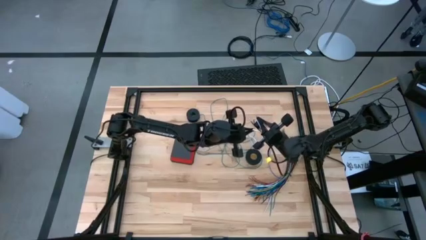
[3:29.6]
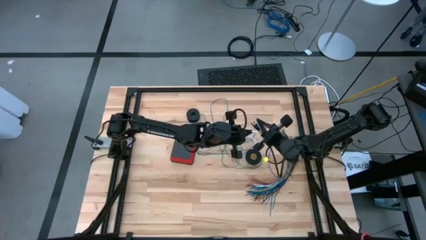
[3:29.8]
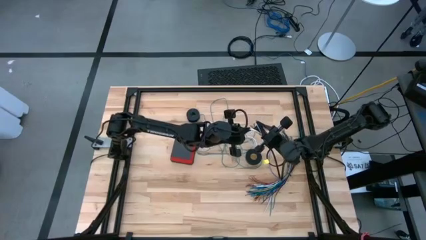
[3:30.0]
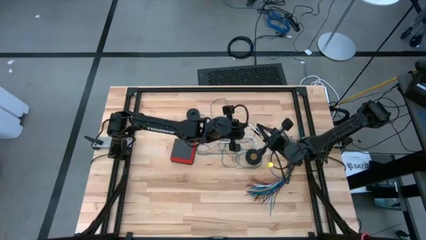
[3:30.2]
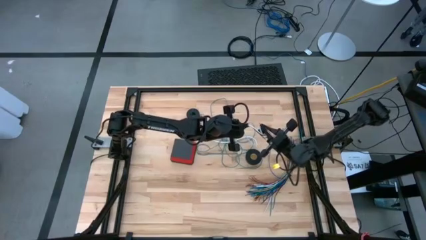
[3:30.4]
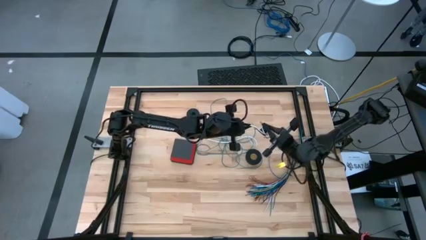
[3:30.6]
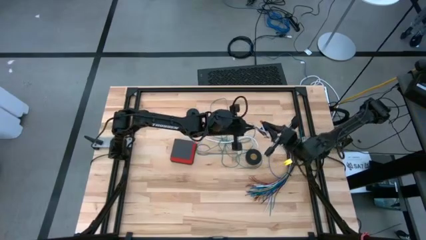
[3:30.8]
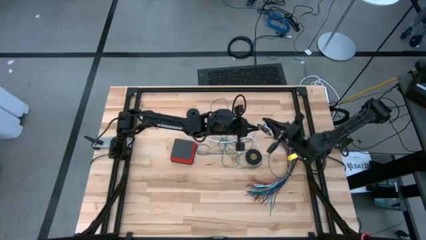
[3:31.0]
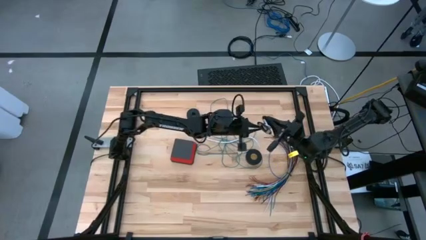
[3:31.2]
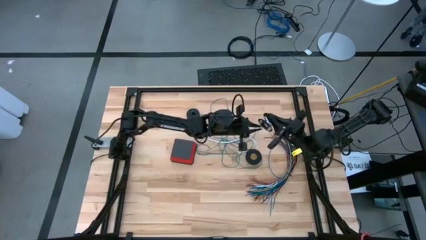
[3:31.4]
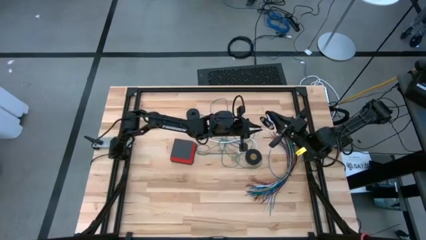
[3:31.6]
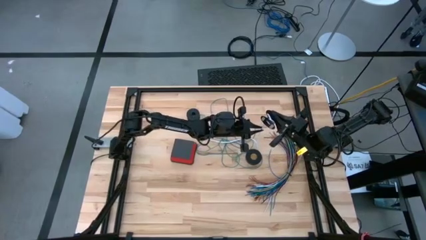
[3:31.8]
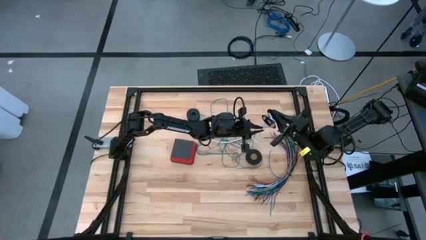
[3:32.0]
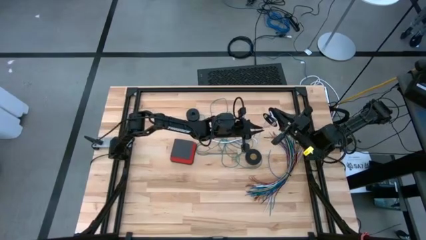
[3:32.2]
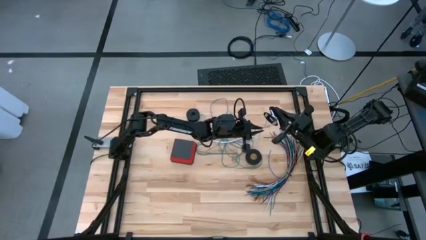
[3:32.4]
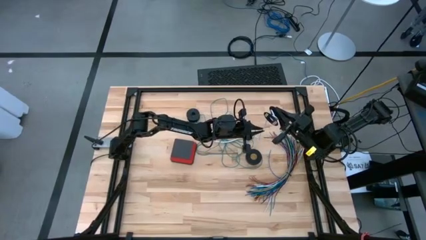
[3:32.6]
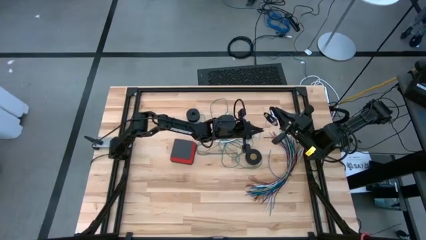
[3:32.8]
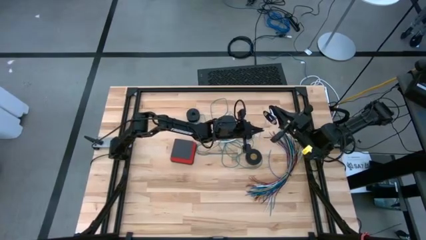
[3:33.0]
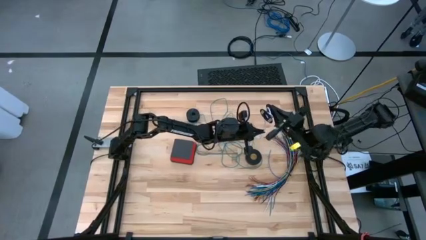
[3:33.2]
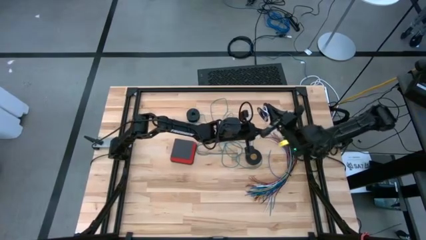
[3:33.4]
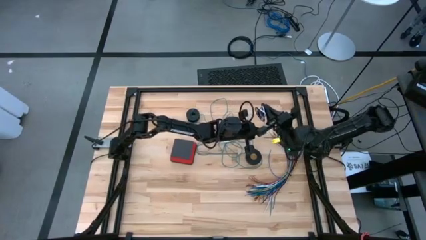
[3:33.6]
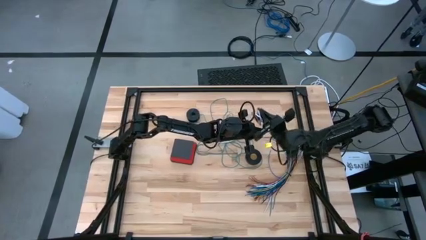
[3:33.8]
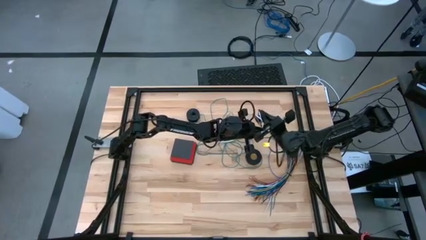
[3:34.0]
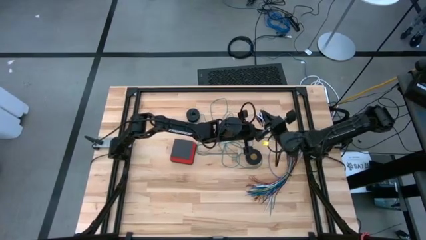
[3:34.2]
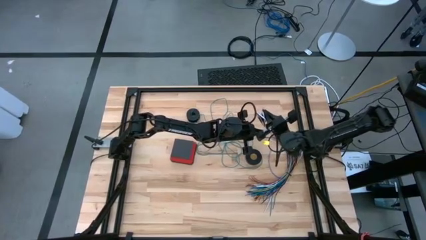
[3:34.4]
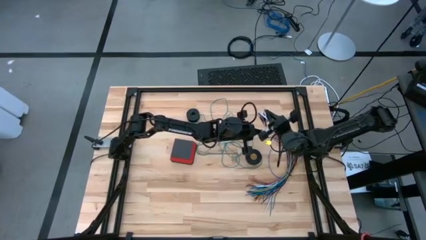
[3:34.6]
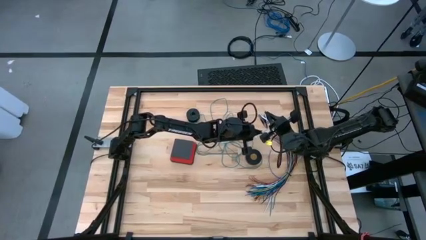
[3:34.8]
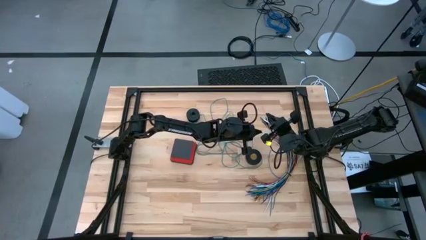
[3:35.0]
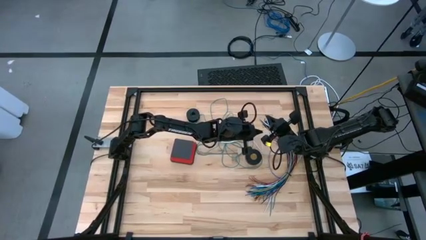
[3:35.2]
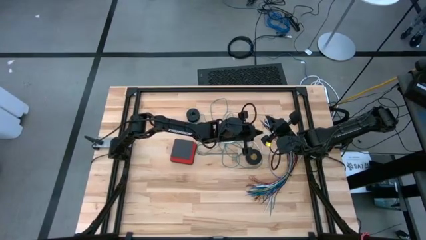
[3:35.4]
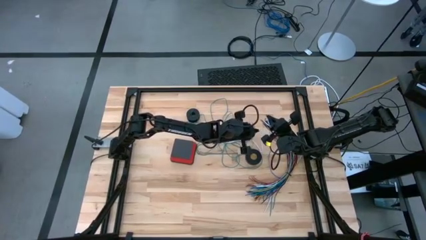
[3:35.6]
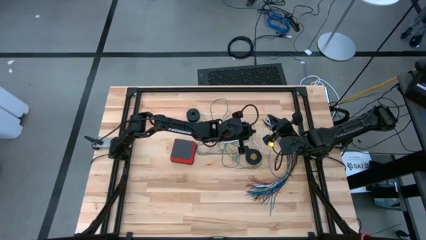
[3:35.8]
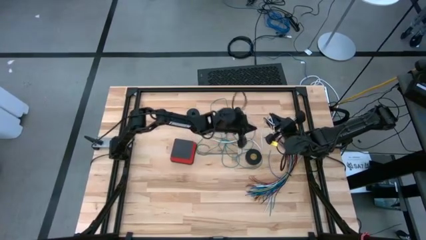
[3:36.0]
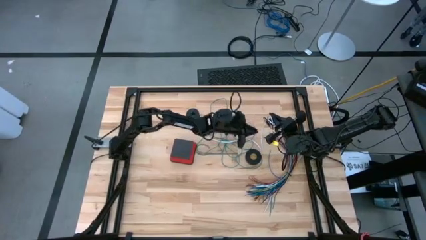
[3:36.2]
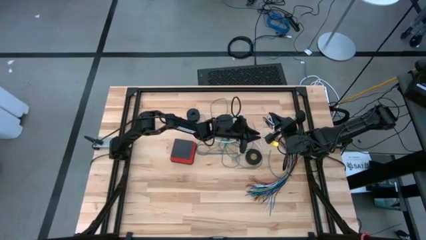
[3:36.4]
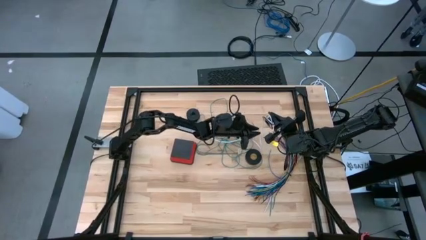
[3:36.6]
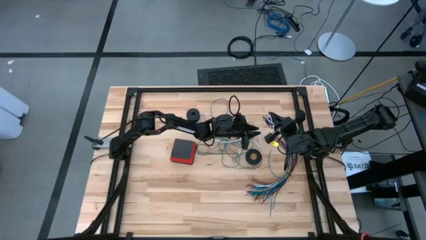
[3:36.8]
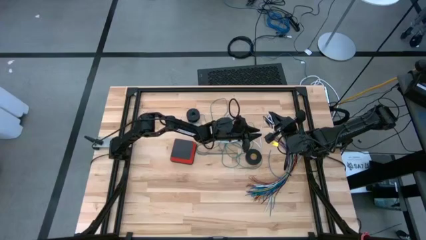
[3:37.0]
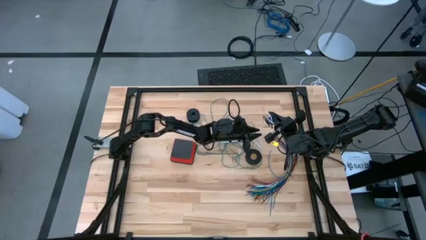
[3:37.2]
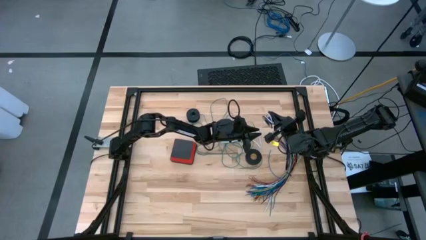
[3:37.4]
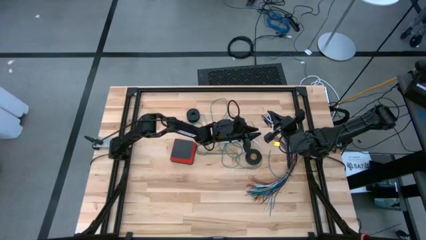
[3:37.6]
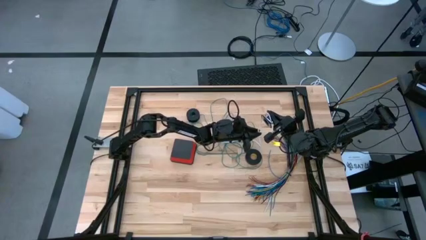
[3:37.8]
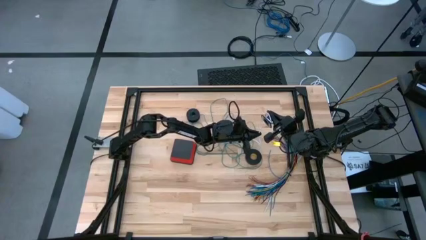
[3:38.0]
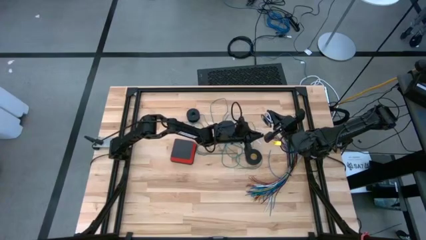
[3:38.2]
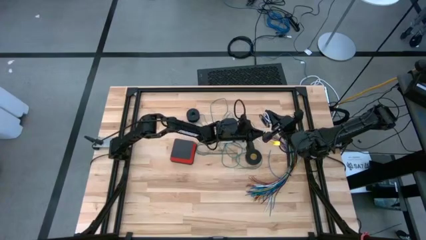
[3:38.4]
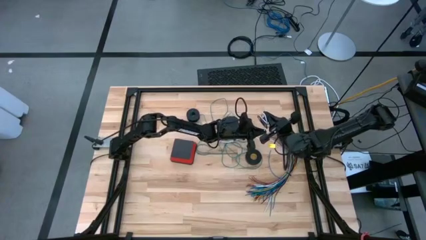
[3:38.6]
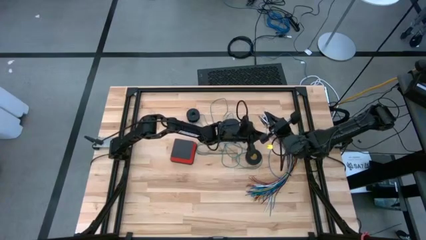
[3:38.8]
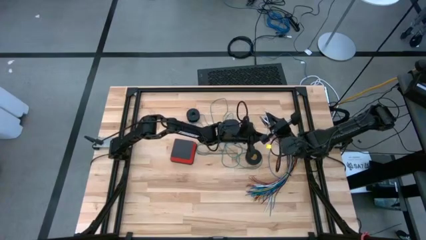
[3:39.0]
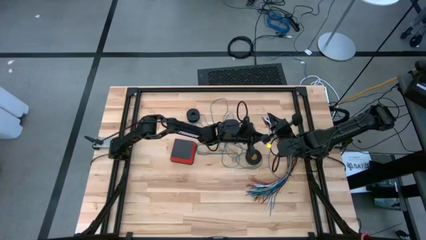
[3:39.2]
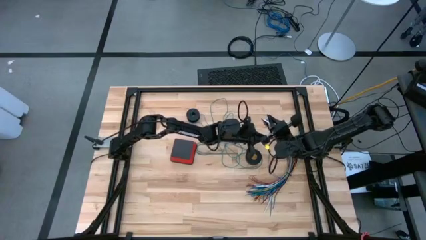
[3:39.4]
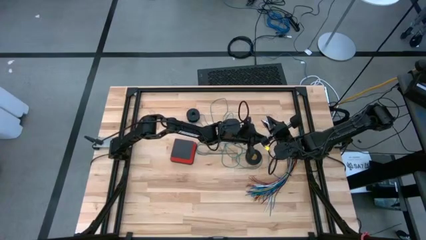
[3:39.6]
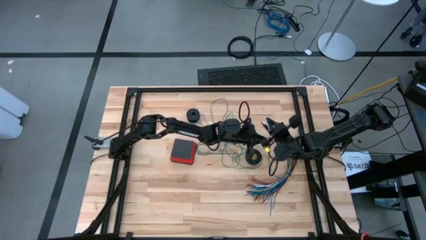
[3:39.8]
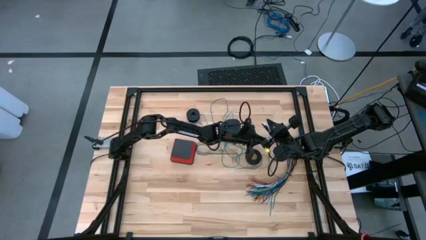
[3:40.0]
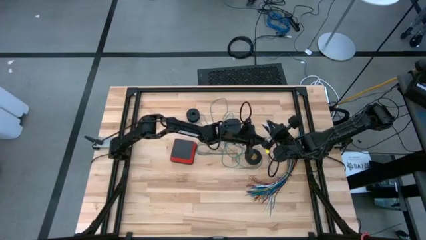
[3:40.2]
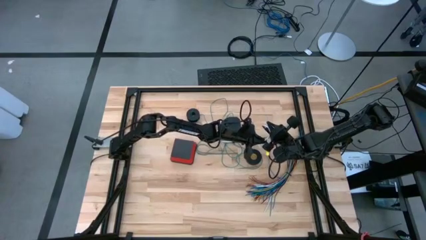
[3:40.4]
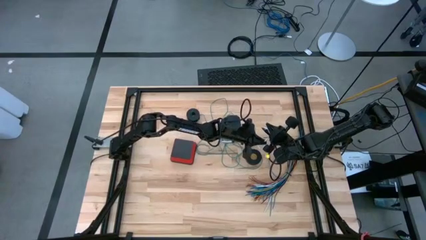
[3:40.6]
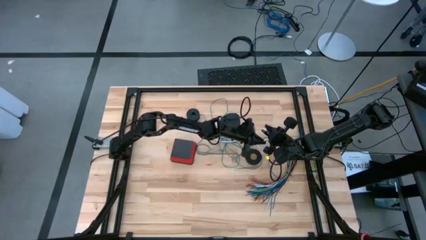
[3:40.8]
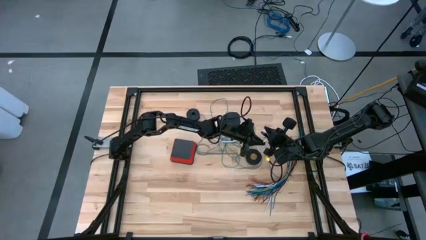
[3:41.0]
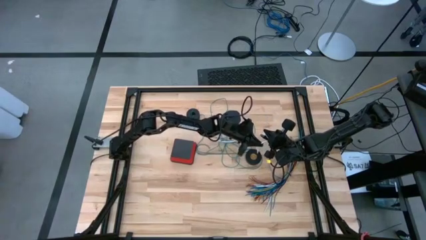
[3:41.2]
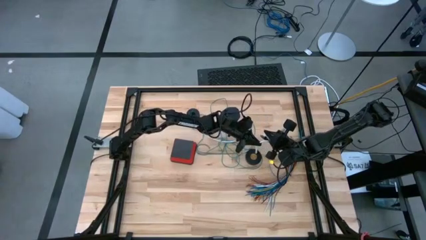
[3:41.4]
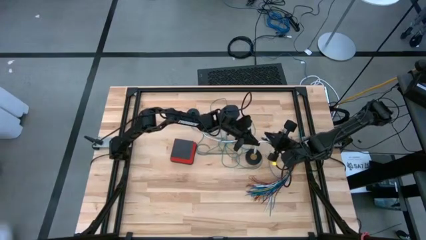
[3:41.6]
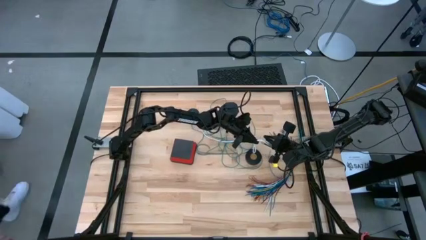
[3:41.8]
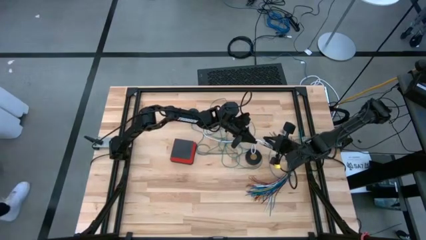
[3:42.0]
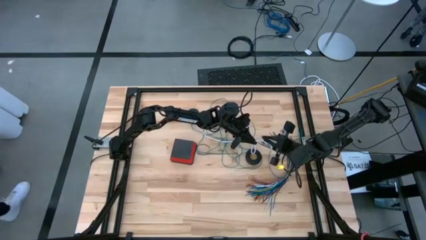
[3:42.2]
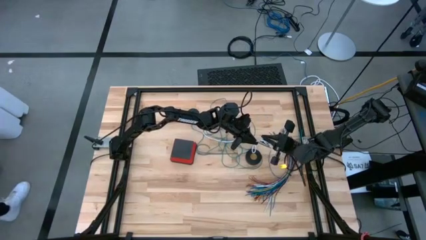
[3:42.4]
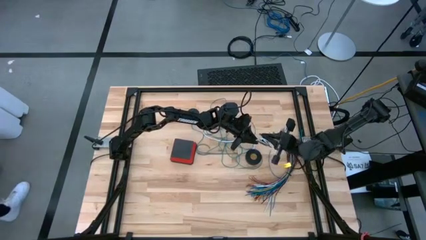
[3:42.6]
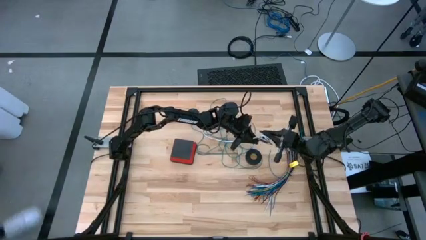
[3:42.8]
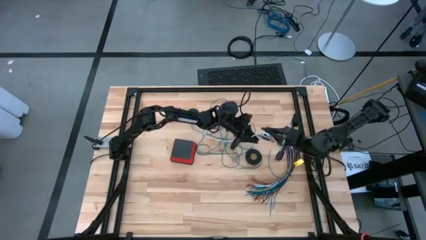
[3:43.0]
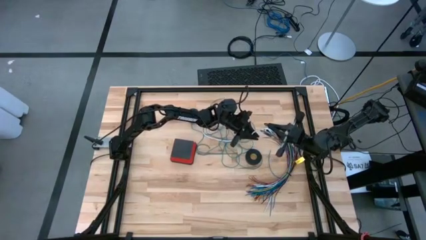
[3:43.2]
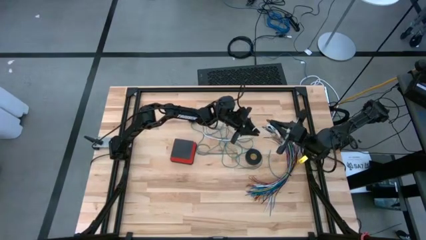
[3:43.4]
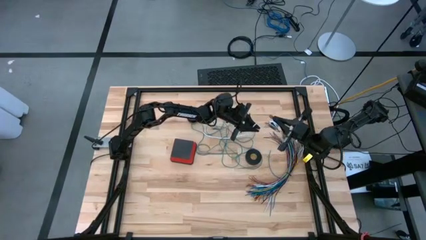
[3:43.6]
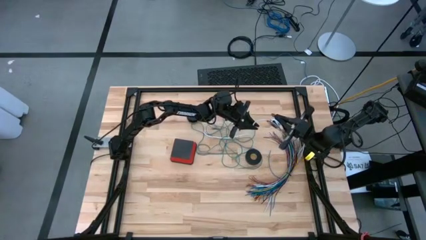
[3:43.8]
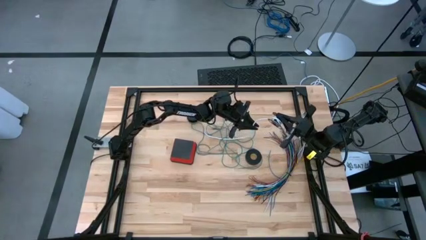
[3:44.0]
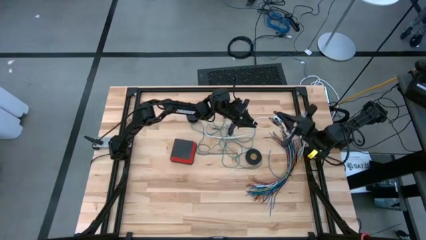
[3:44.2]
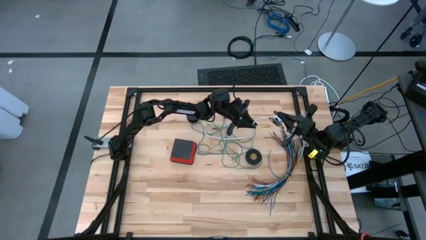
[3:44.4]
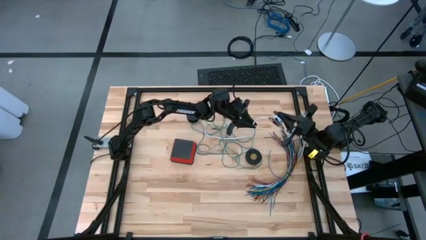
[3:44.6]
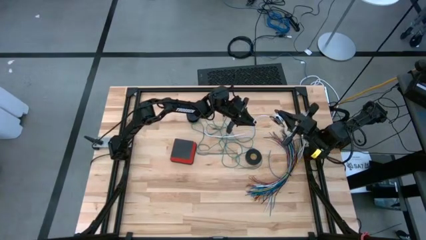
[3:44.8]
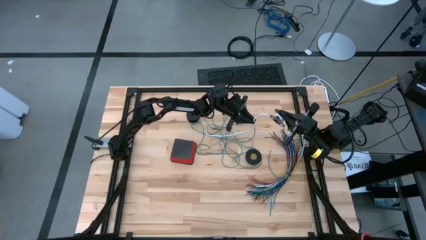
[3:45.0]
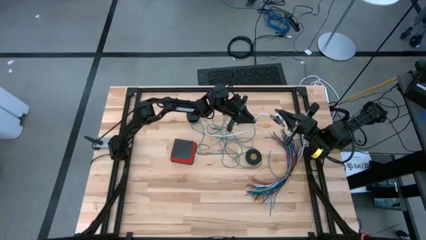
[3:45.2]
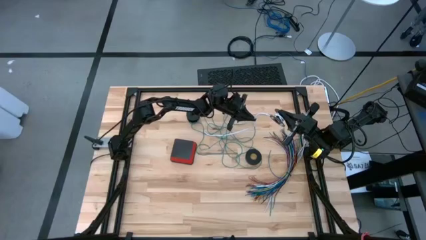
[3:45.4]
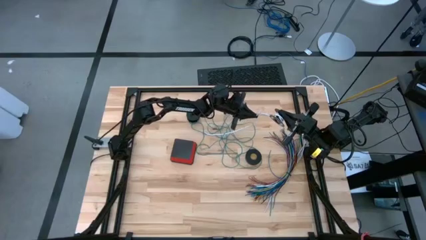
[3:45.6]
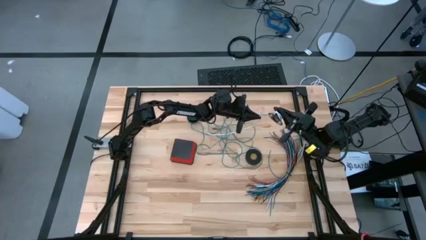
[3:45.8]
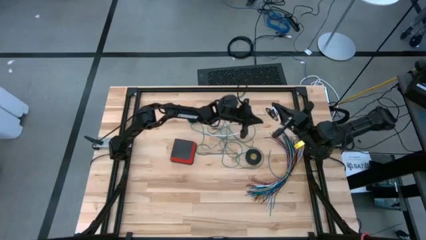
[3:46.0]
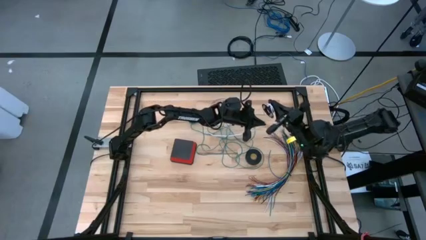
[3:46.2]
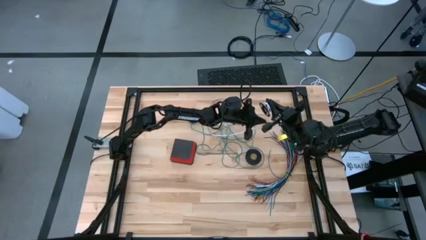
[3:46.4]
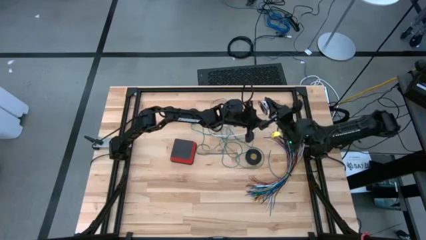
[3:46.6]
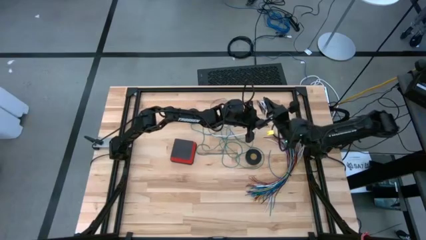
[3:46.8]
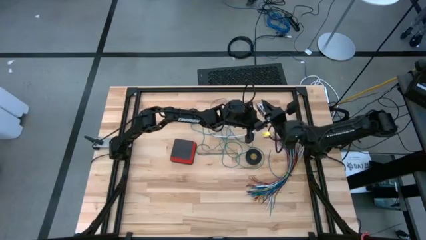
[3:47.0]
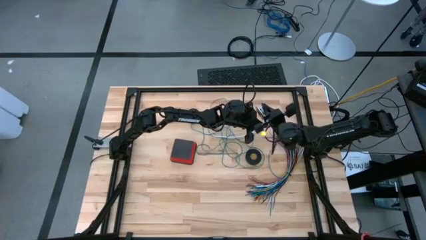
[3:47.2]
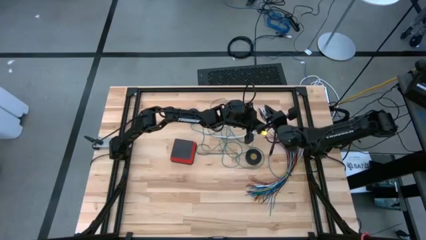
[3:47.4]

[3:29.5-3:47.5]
Task: Coiling cords
Coil the white wire cable on the spool
